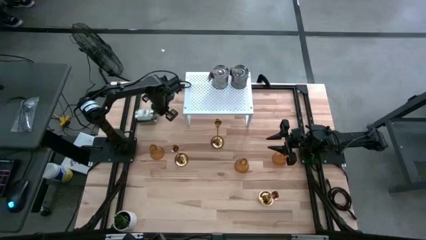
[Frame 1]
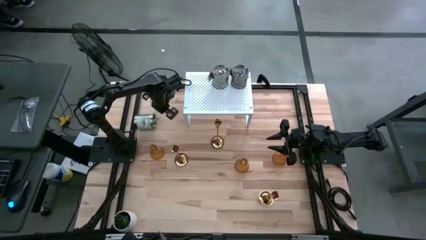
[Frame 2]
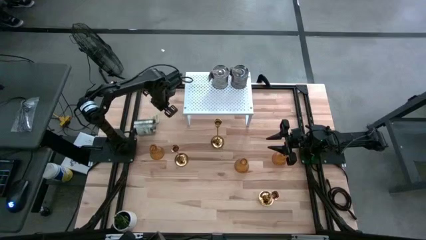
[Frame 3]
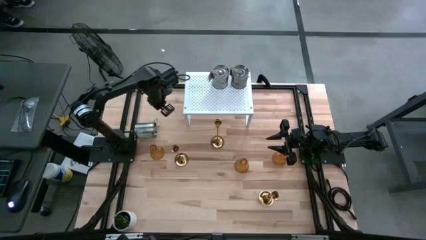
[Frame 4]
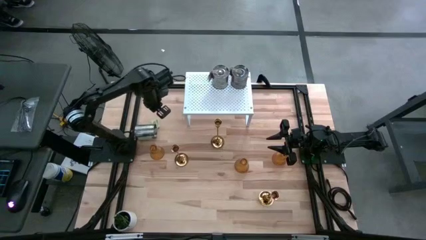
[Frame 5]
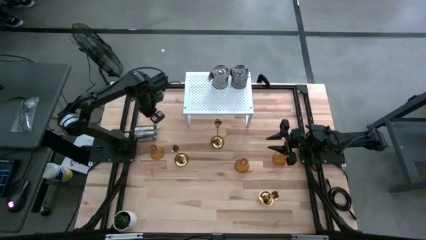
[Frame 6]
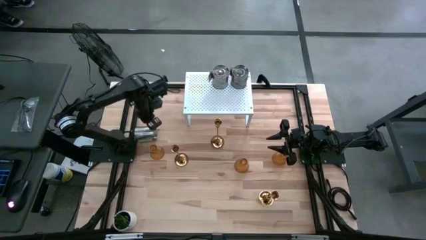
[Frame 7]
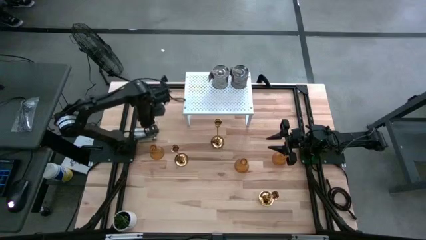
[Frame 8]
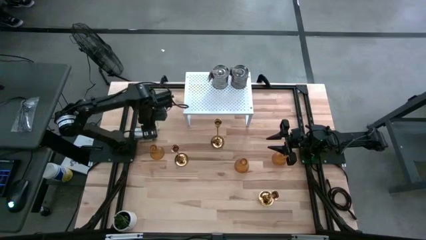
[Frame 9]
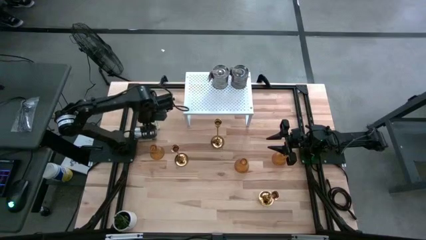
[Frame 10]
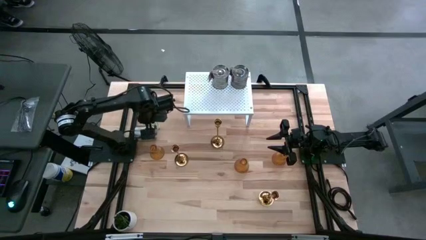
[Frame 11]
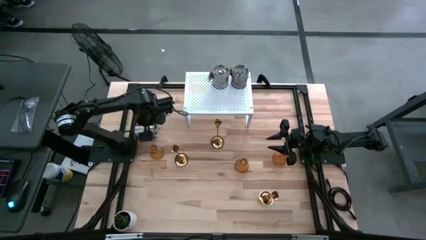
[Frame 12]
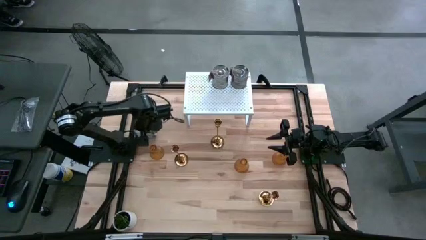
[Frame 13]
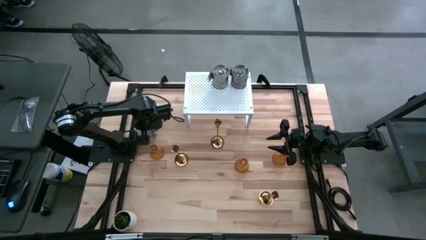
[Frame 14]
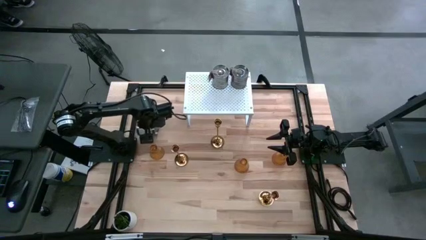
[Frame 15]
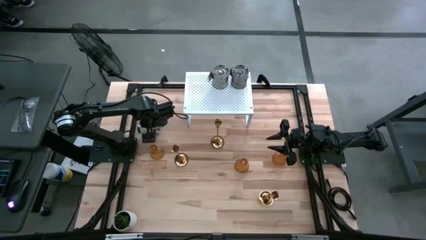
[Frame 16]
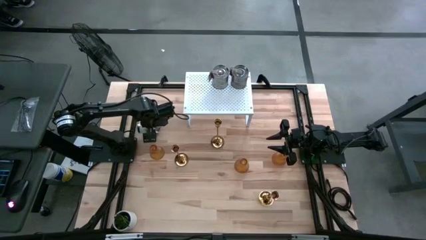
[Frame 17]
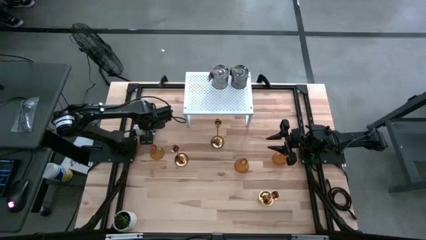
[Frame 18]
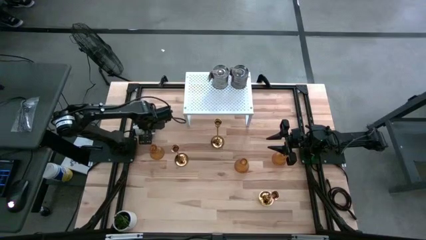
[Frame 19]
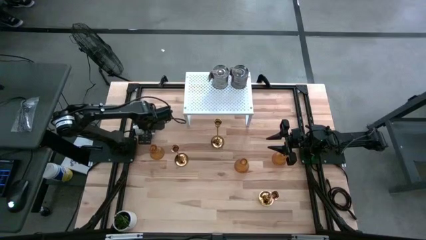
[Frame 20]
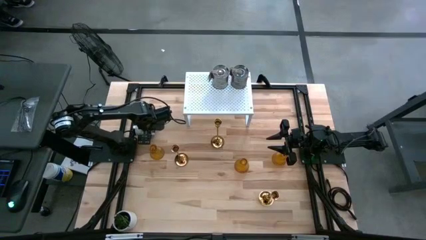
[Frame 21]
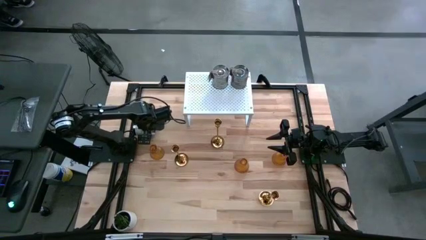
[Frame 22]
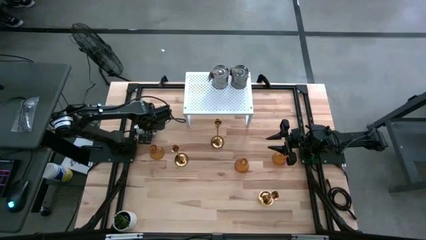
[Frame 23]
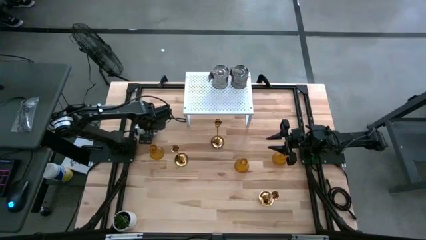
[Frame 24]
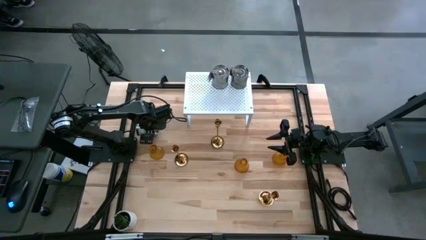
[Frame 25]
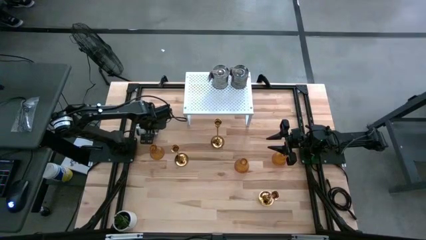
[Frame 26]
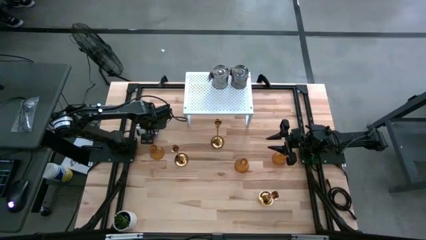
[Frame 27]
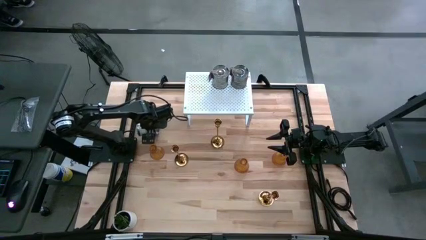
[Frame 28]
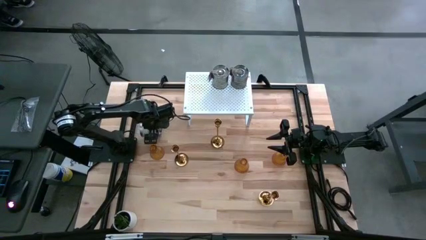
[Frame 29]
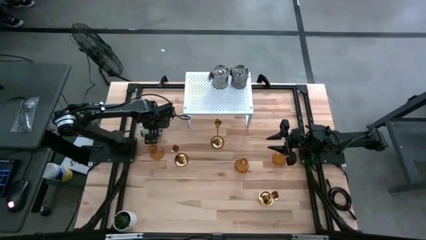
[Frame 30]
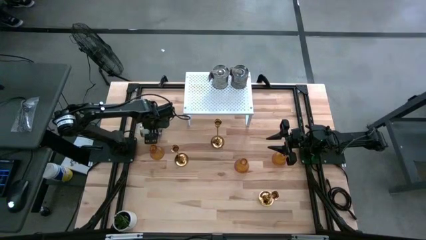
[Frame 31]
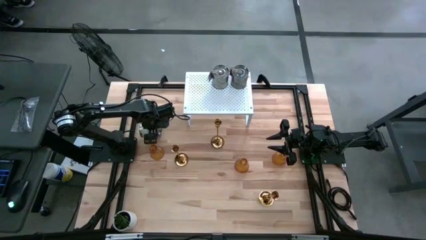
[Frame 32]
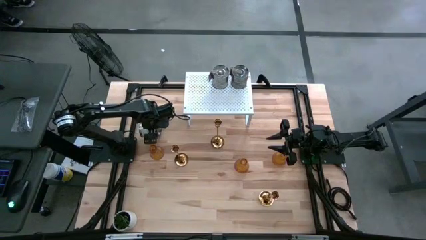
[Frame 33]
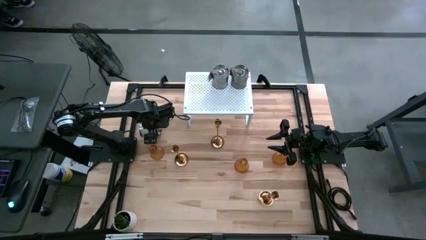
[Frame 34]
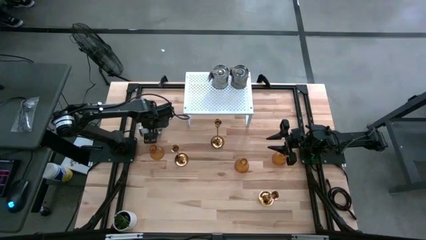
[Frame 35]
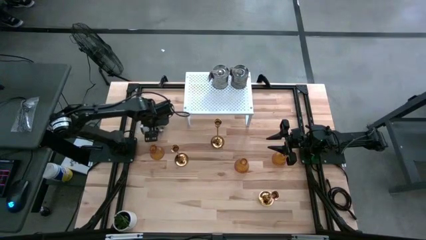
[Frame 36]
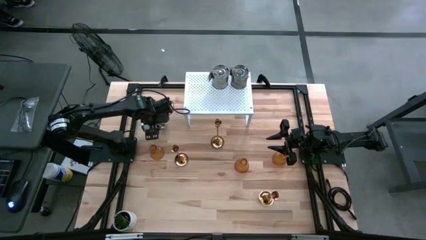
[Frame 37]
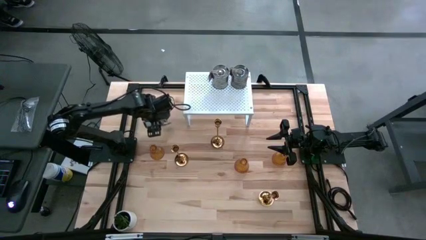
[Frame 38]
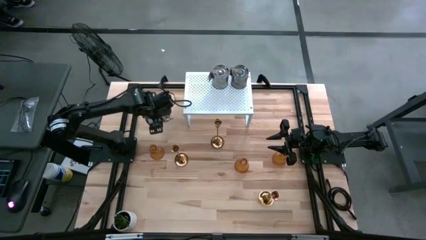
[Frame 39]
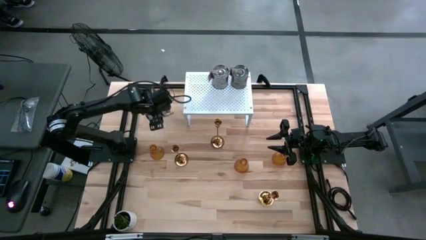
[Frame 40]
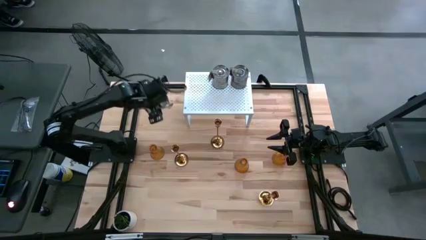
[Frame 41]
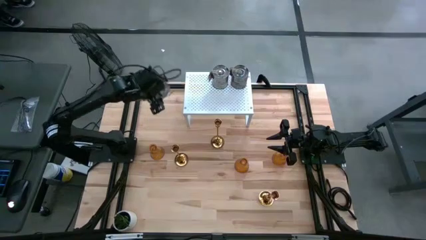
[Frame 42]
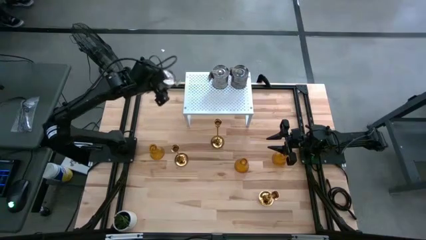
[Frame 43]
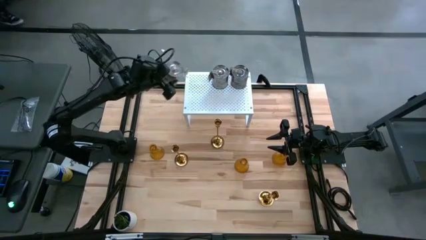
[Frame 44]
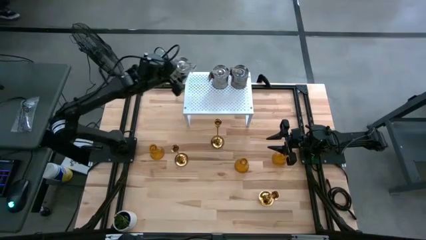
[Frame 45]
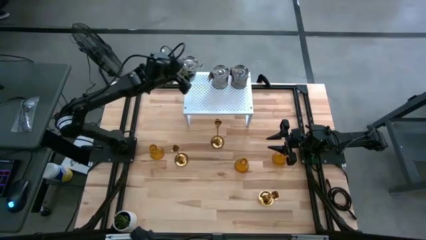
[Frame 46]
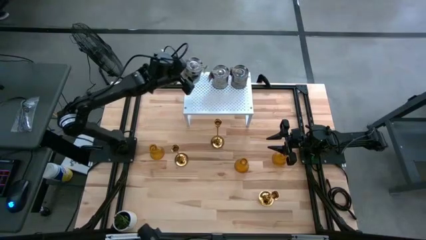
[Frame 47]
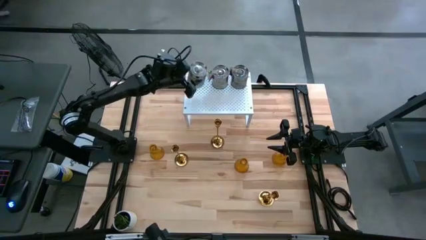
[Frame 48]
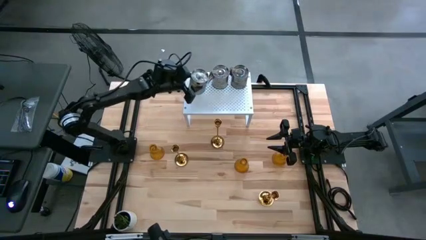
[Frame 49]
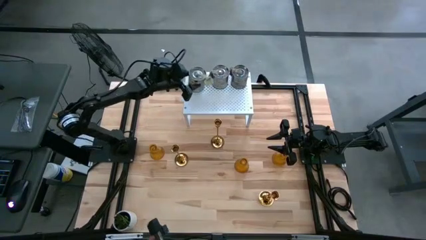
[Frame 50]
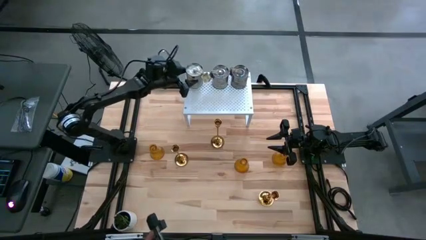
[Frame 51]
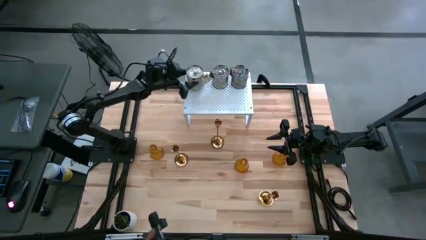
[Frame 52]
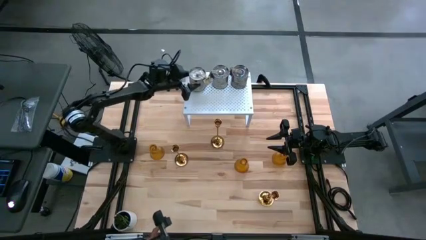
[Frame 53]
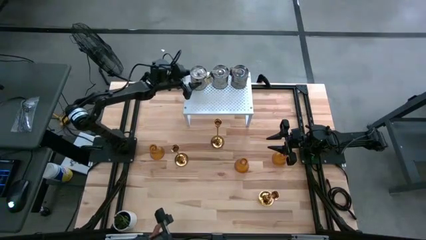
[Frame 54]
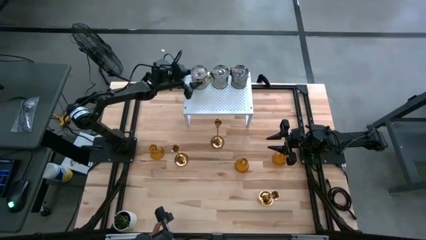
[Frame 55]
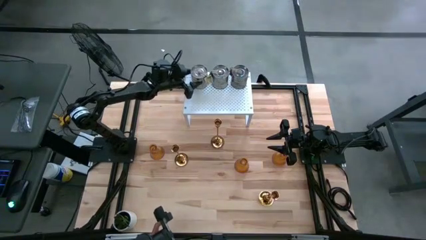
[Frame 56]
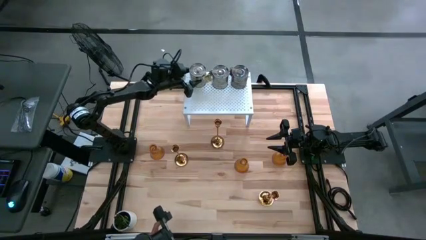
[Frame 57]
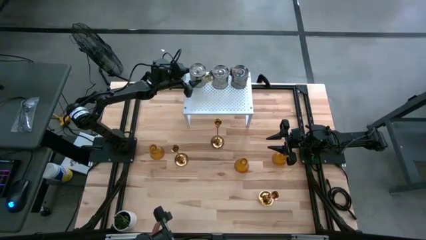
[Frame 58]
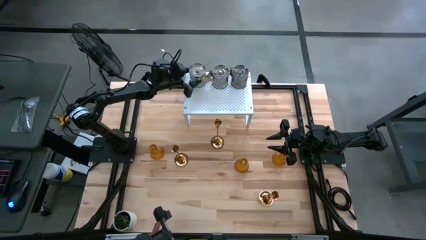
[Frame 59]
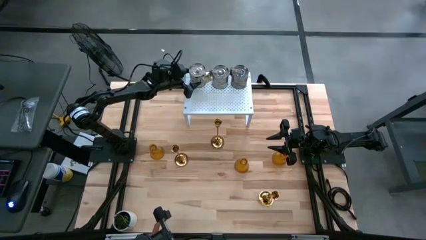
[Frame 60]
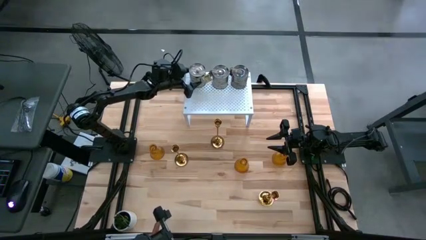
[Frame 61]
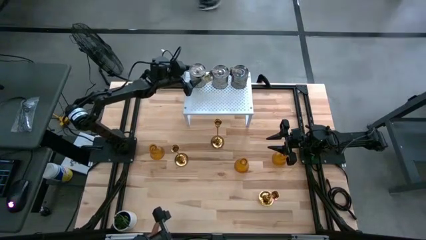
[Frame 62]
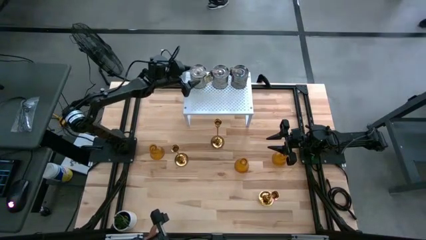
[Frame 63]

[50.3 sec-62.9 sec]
Task: Pick & Place candle stick holders
Put the silver scented candle aligned with the other silver scented candles on the shelf

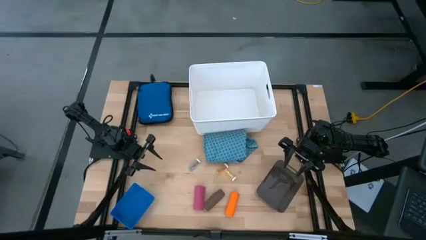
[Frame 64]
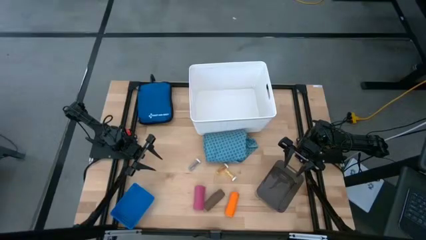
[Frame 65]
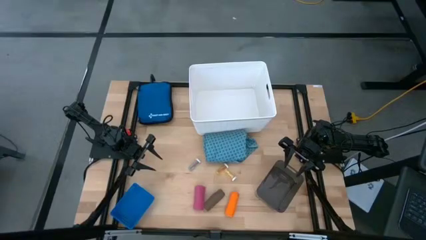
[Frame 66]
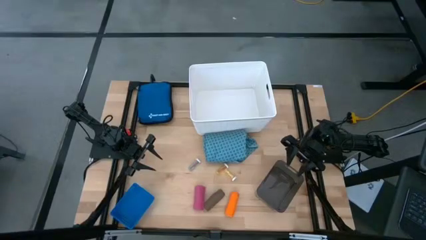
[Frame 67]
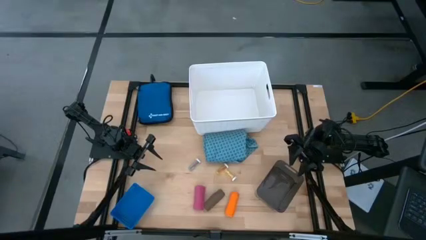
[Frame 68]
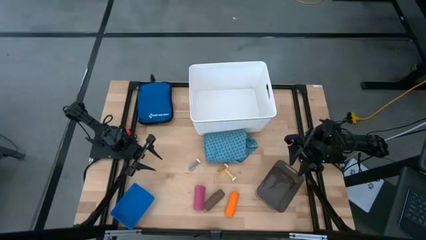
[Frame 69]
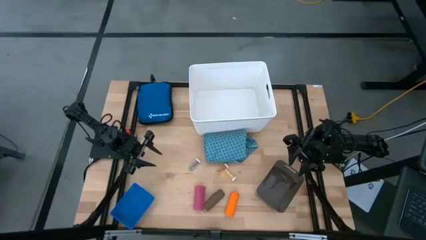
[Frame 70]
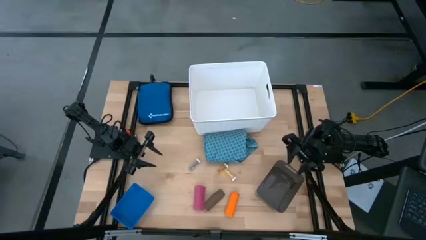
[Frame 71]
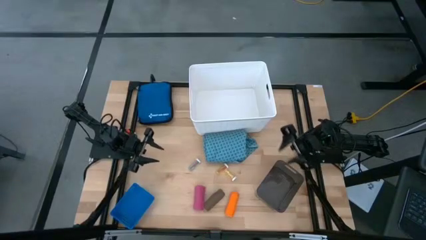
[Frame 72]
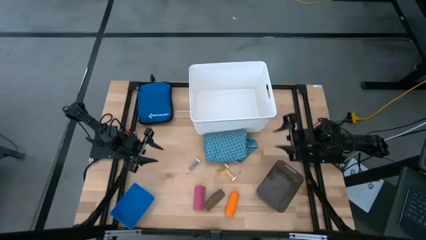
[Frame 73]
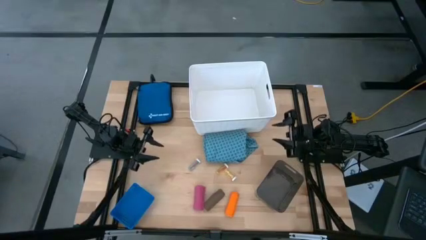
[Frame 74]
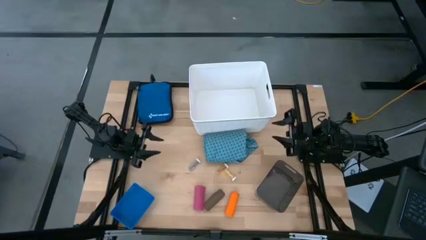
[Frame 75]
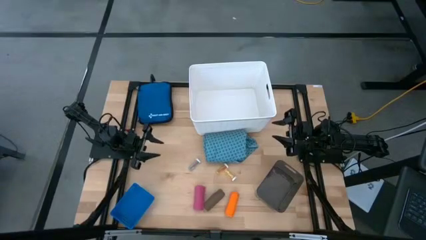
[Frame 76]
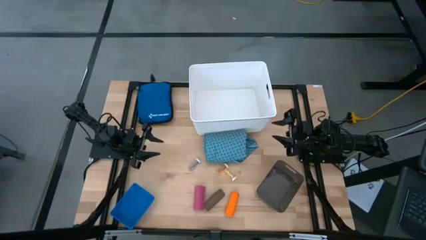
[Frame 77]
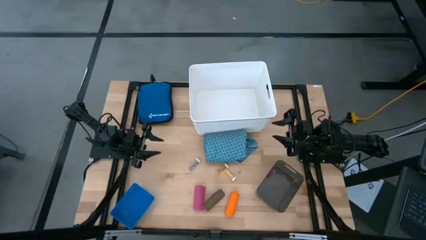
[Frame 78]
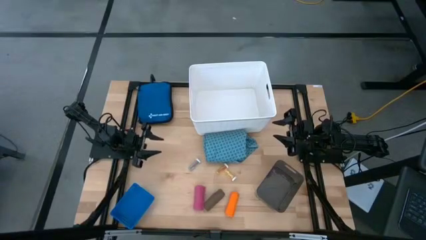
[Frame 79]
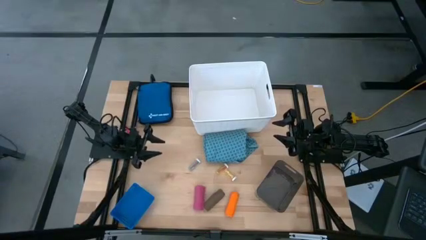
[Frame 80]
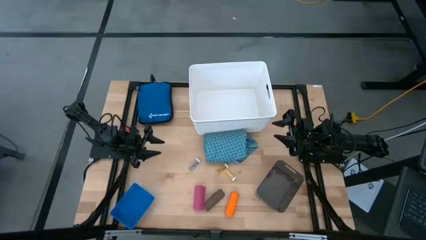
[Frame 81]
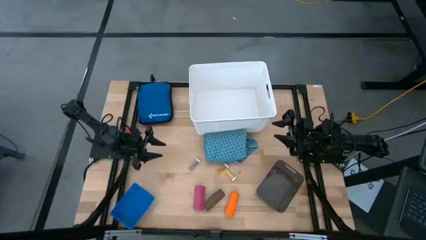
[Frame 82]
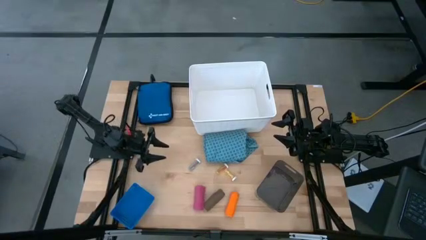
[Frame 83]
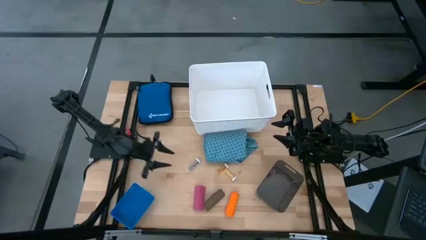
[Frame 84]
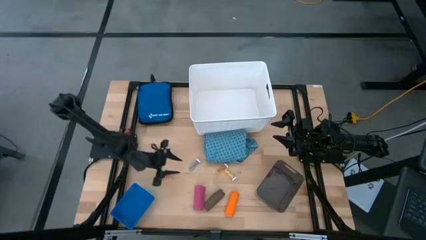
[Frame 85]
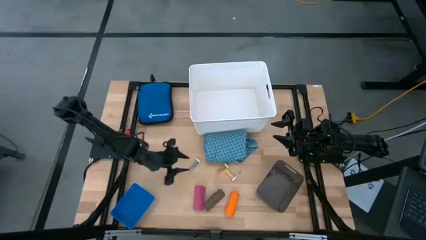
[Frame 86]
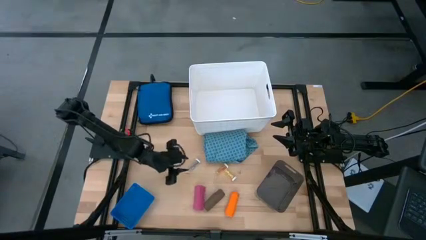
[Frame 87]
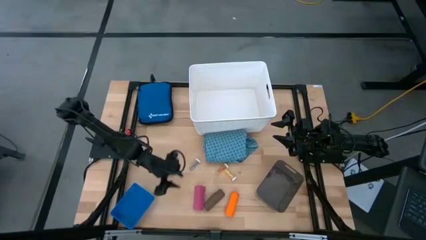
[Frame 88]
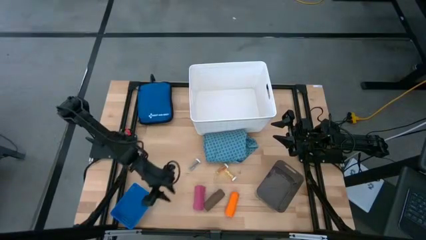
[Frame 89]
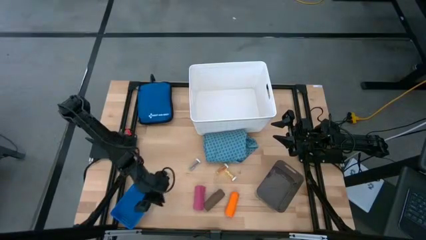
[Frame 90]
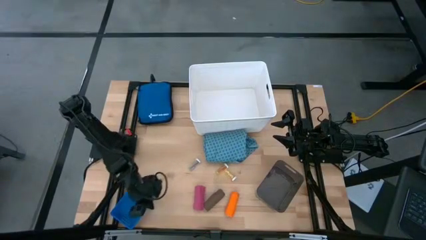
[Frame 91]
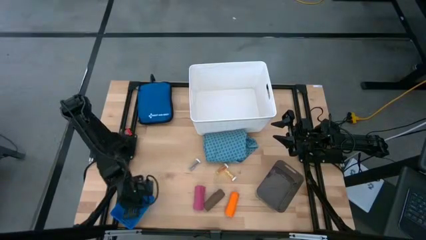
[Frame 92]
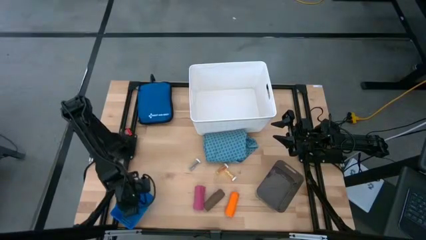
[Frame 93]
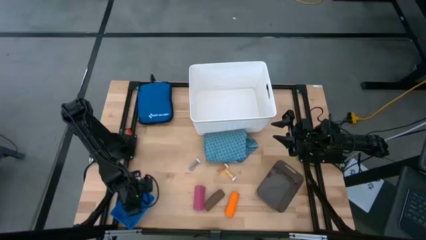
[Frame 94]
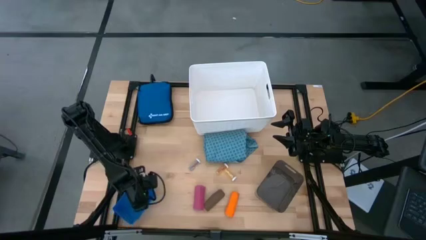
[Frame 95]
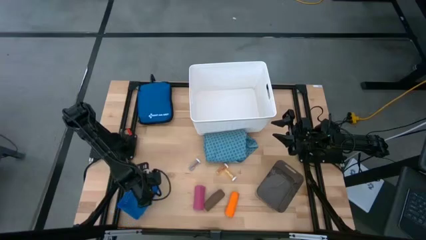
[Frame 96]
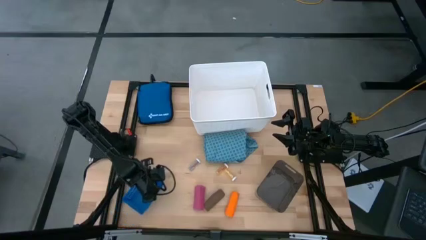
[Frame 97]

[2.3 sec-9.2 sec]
Task: Pick & Place Medicine items
Prepare the blue basket
